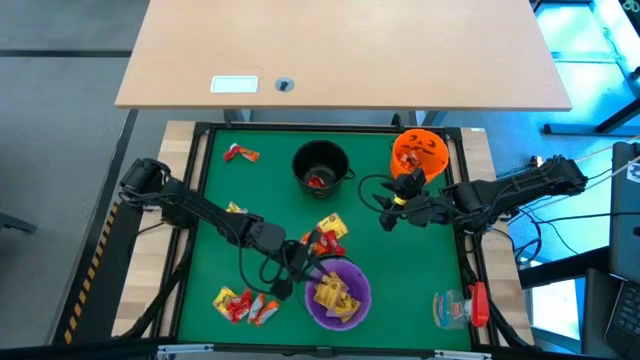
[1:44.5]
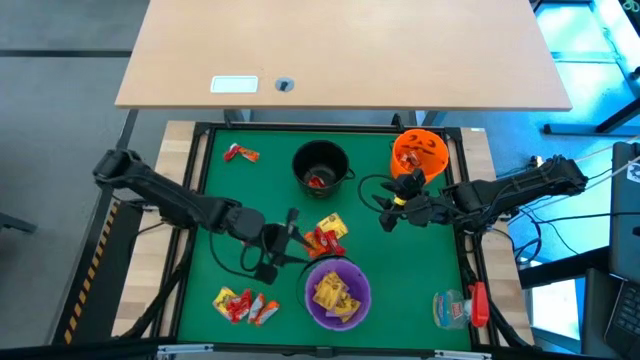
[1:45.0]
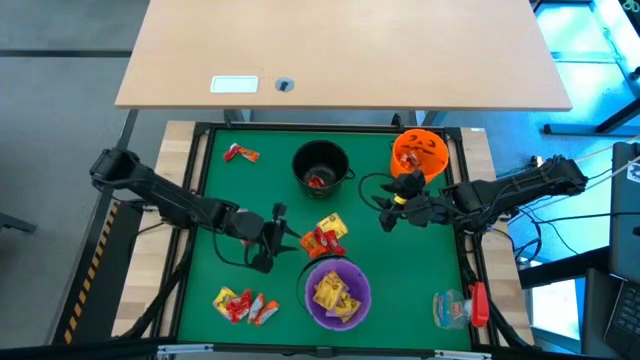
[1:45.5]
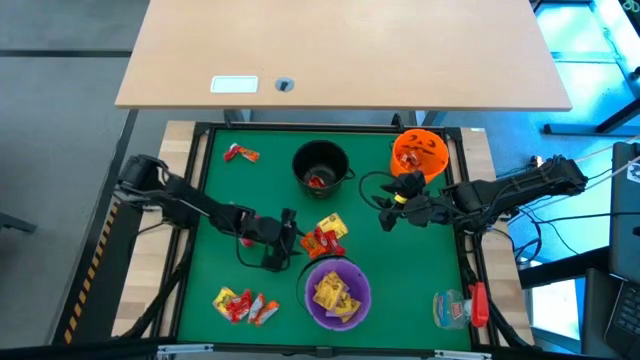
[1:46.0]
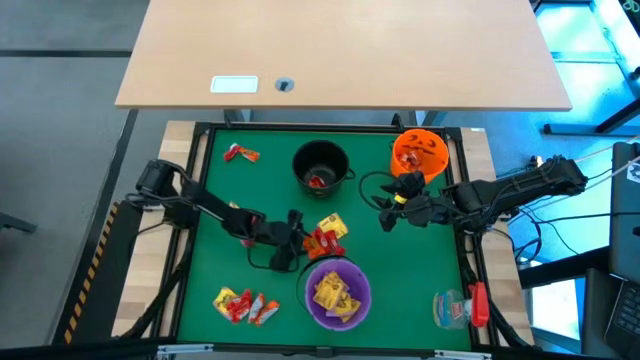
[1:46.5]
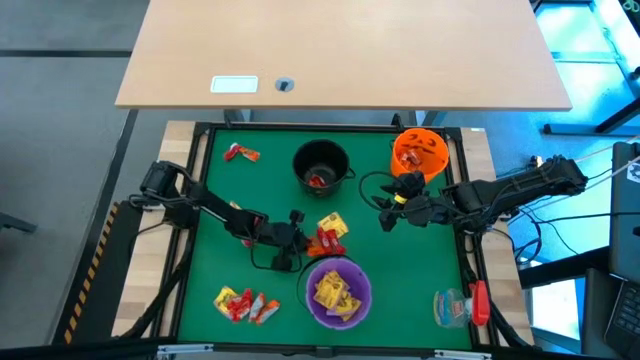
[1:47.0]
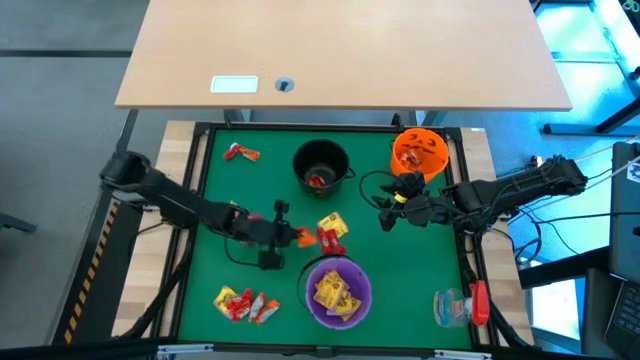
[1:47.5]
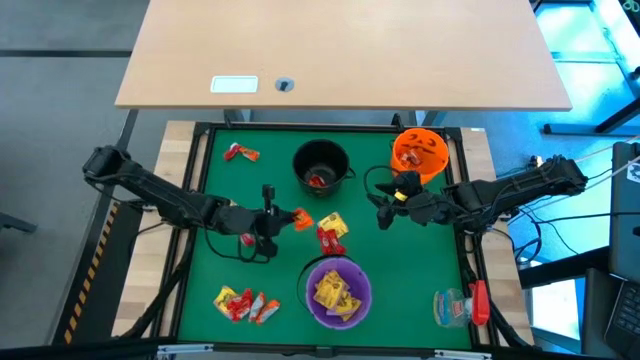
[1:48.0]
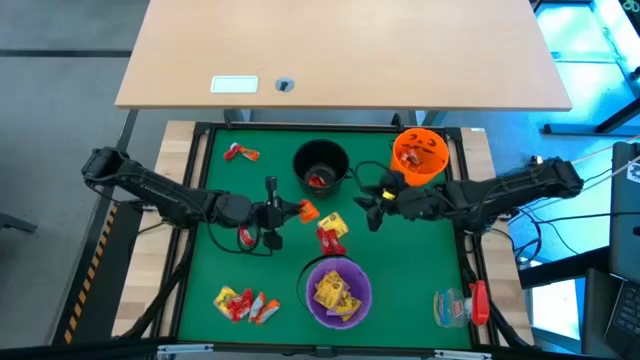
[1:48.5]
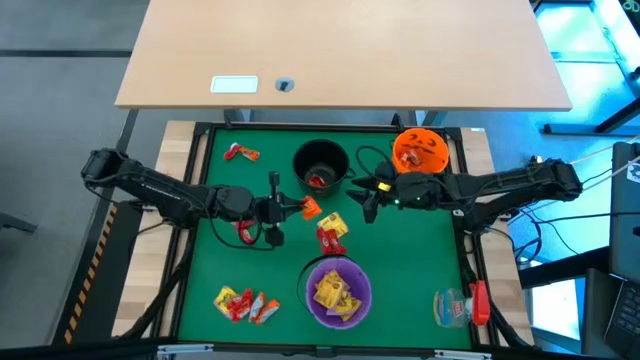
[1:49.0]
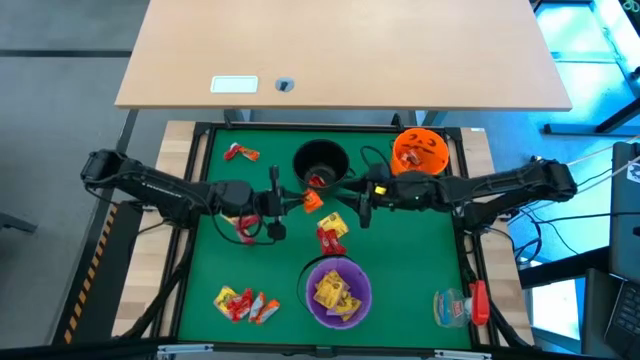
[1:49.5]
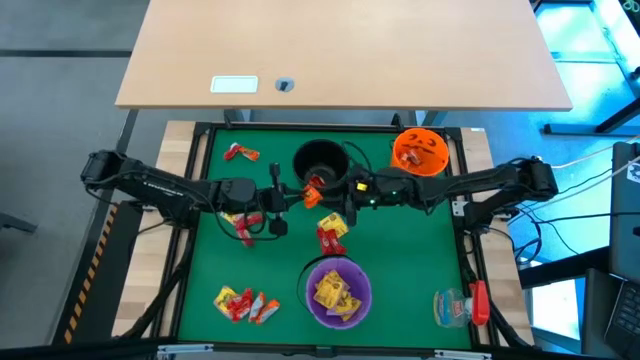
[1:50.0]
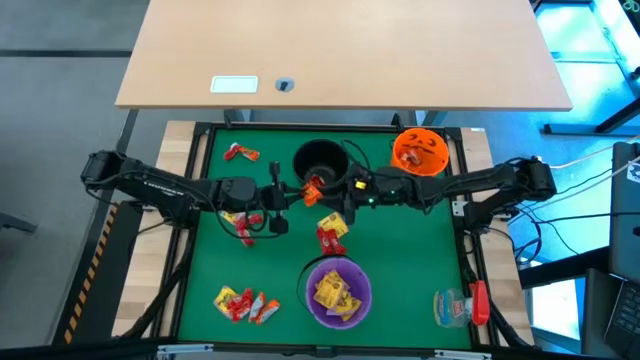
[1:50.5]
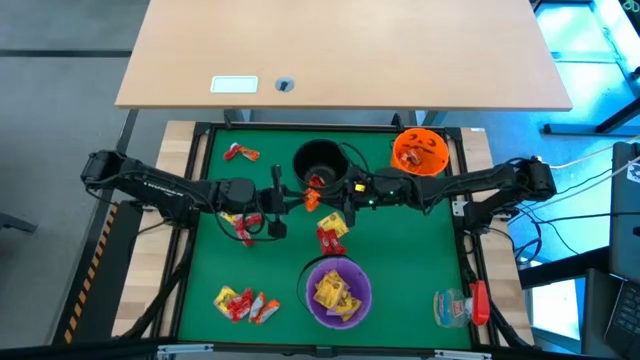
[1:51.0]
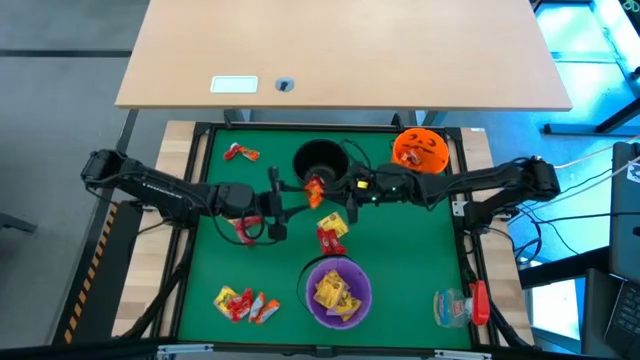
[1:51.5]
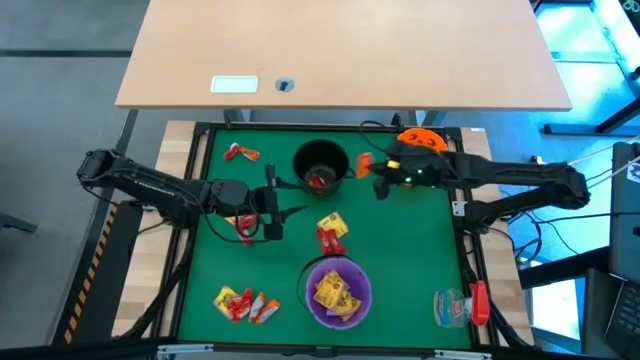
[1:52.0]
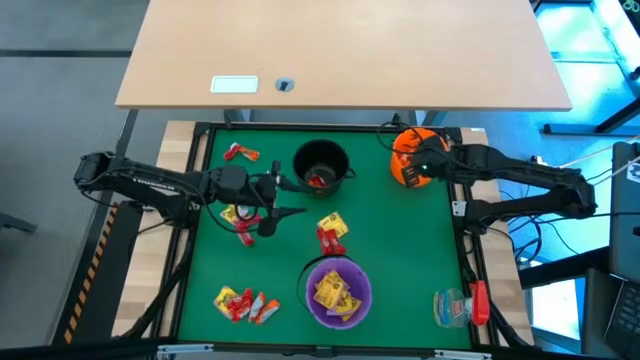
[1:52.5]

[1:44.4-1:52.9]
Task: Sort candy
Put the orange candy into the orange bucket

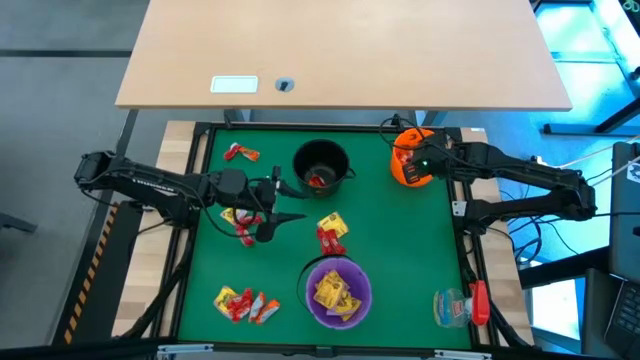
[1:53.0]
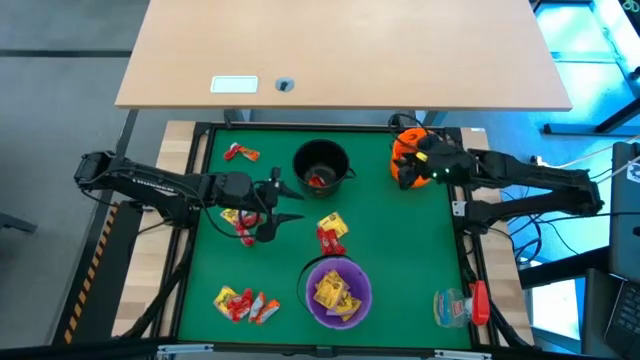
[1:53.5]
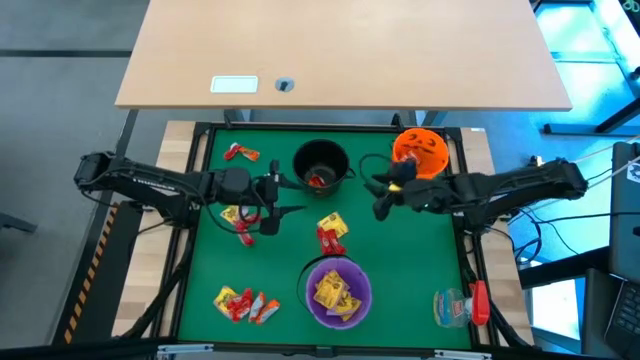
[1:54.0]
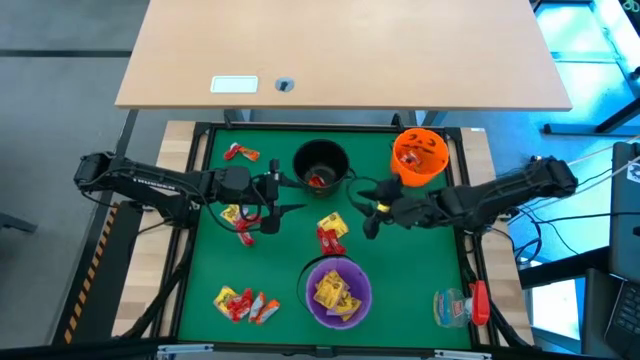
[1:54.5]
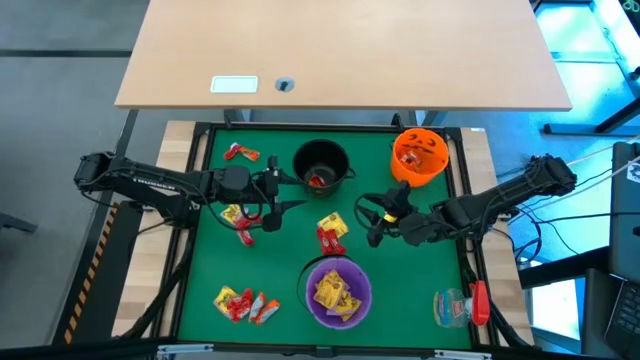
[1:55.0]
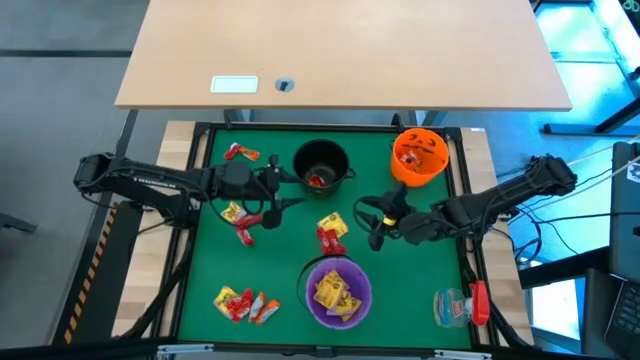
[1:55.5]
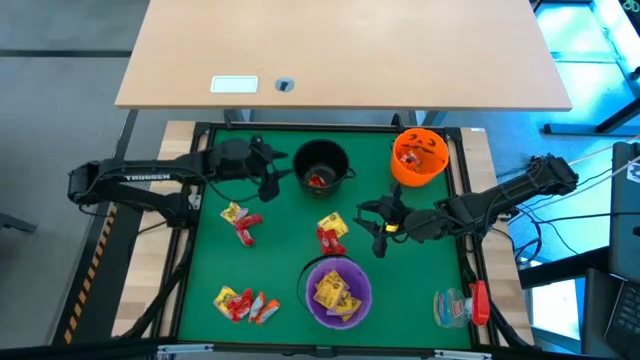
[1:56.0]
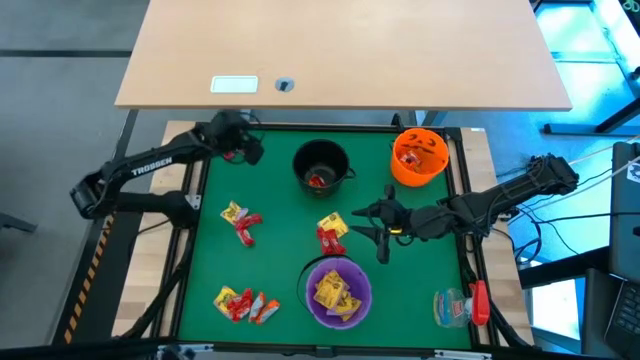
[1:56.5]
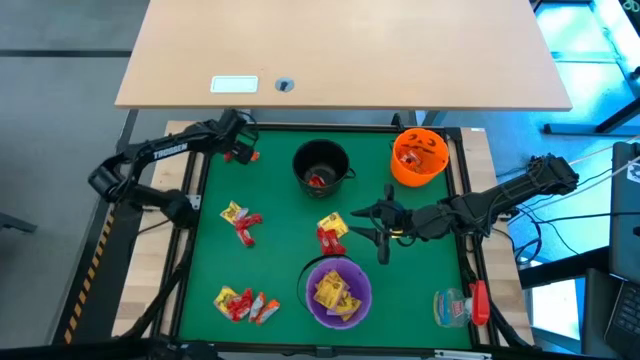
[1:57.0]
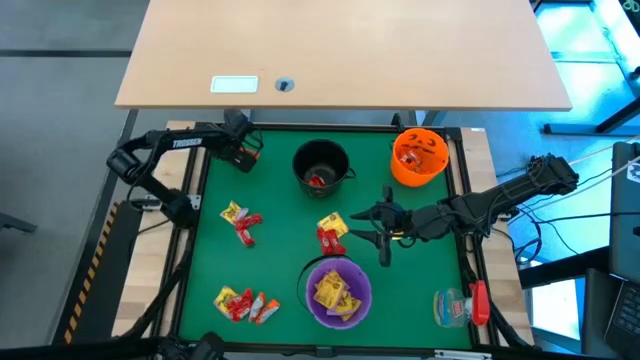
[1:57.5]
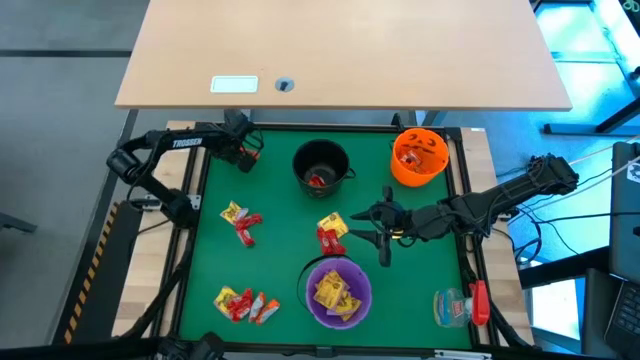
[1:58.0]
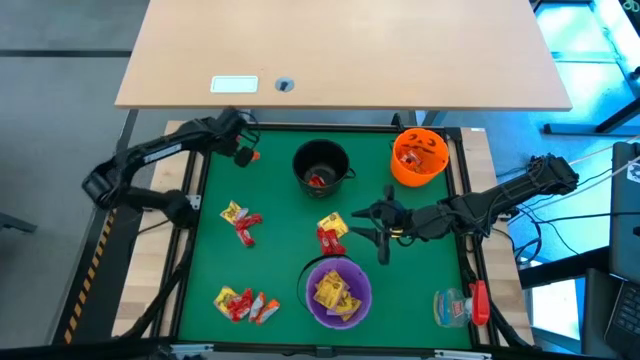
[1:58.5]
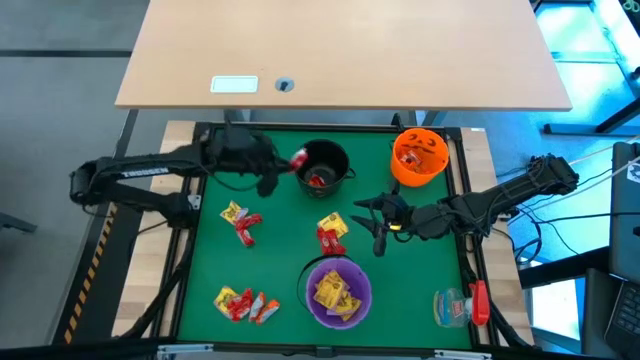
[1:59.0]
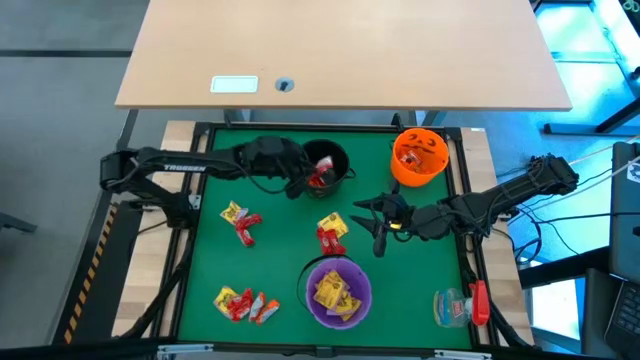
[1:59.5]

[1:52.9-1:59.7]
Put the red candy into the black bucket

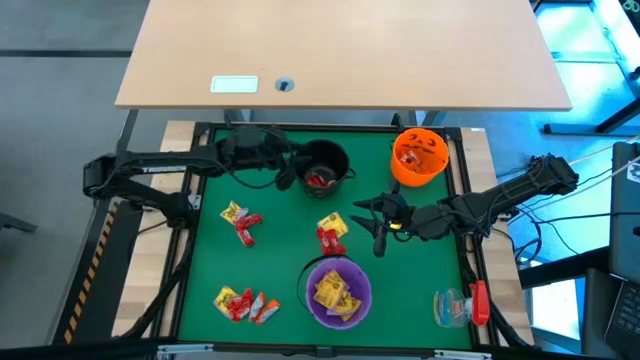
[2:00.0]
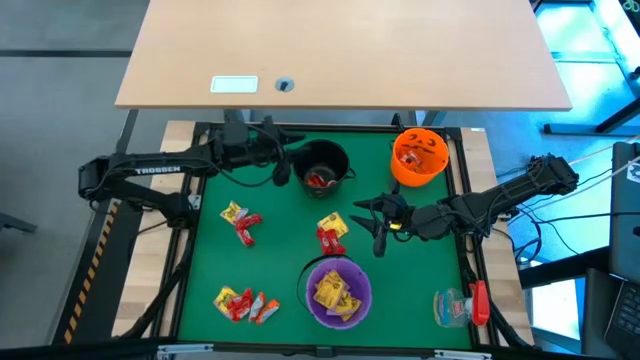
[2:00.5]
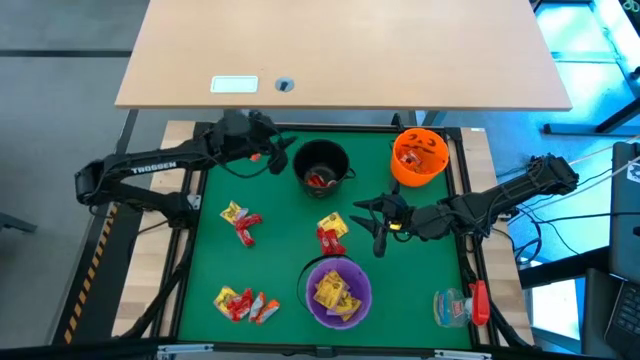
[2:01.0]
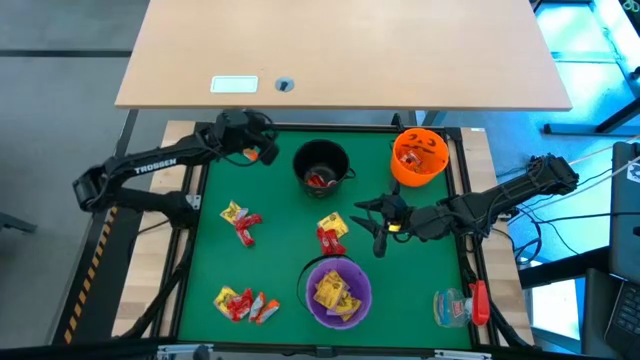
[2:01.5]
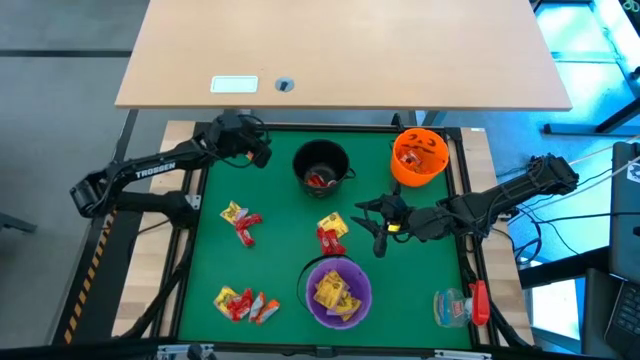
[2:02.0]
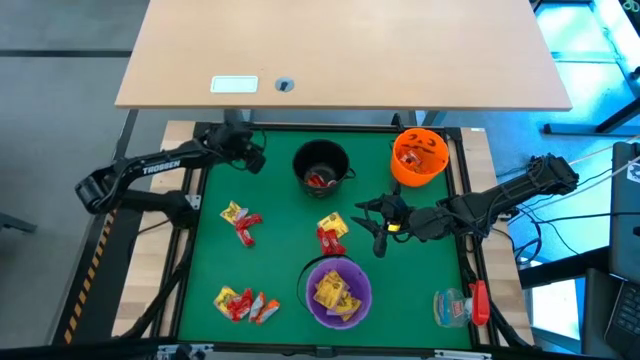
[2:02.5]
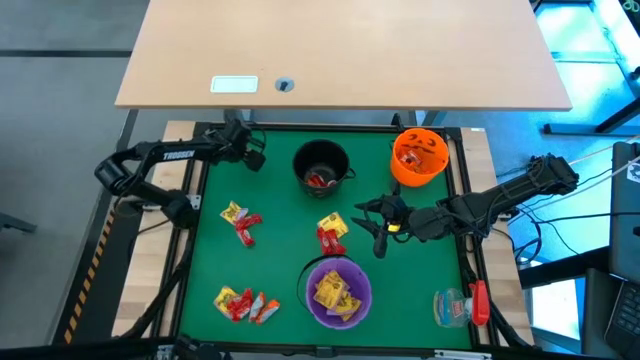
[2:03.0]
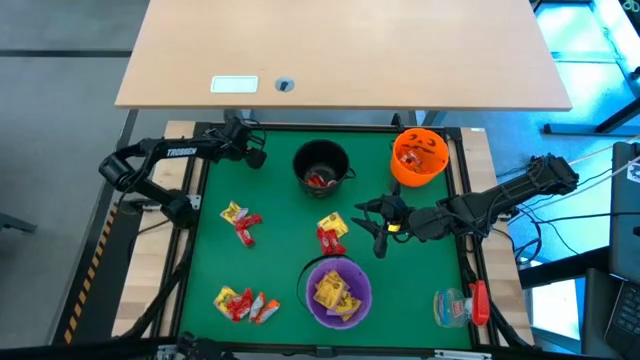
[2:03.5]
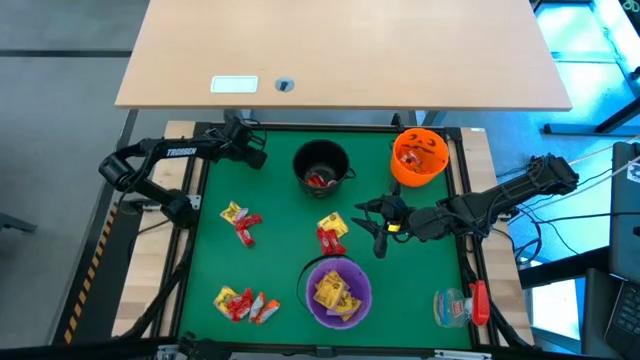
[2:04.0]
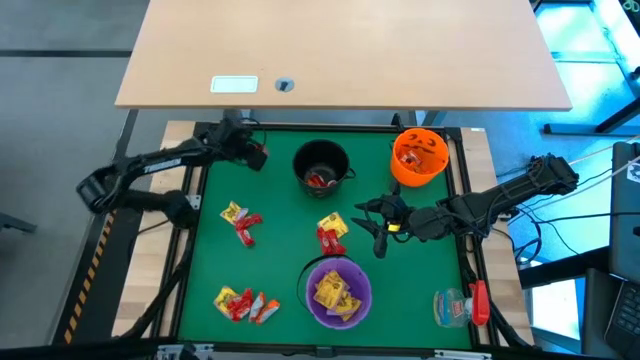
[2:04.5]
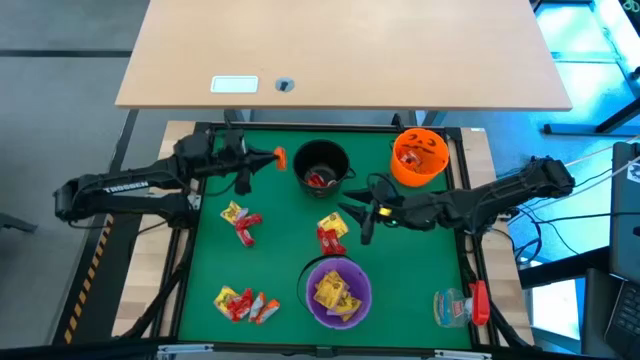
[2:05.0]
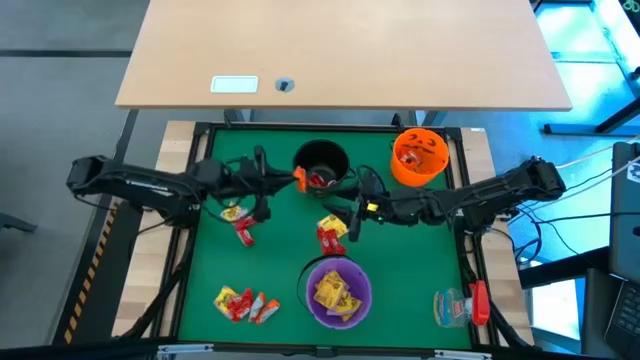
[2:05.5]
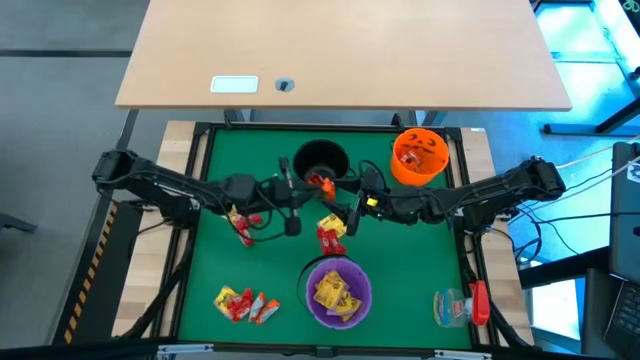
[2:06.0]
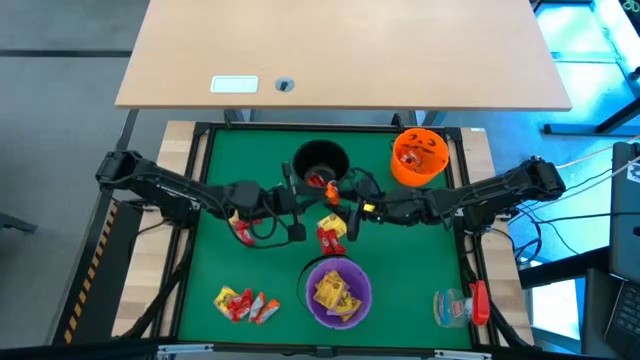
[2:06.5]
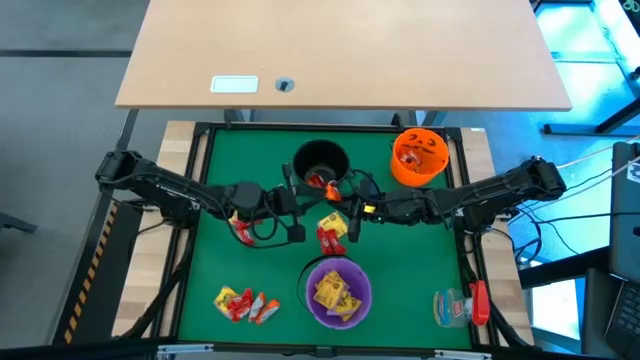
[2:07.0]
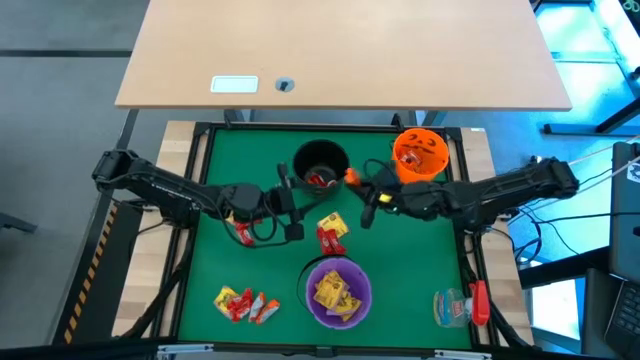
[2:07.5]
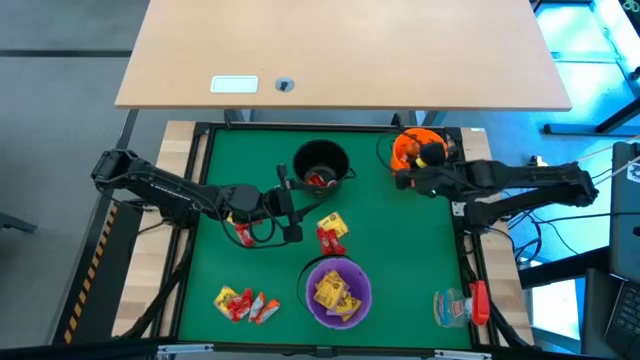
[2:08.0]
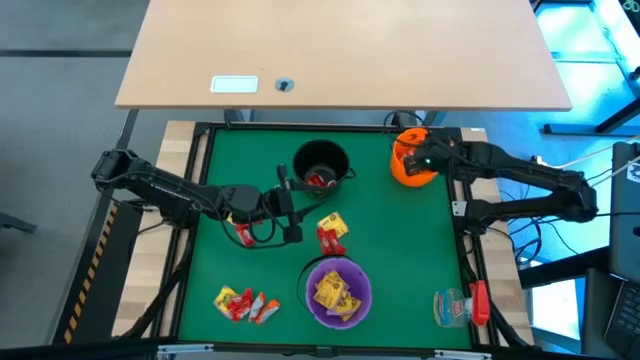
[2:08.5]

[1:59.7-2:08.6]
Put the orange candy into the orange bucket
